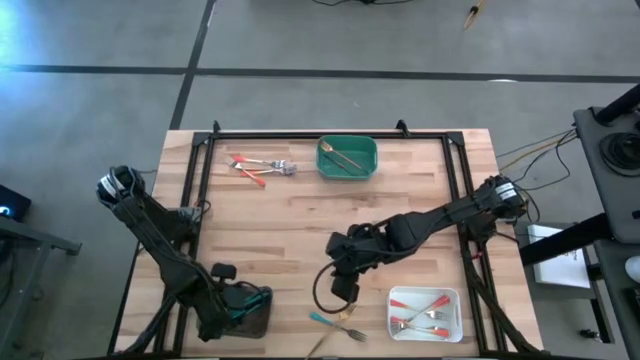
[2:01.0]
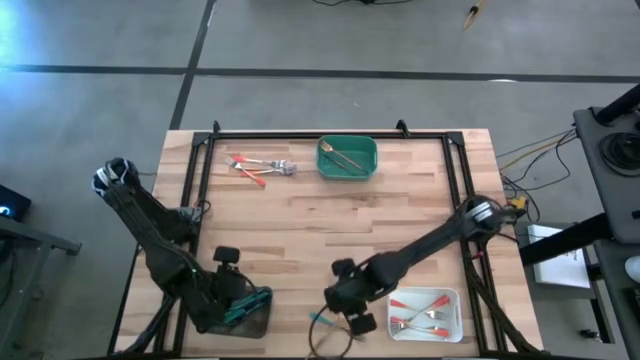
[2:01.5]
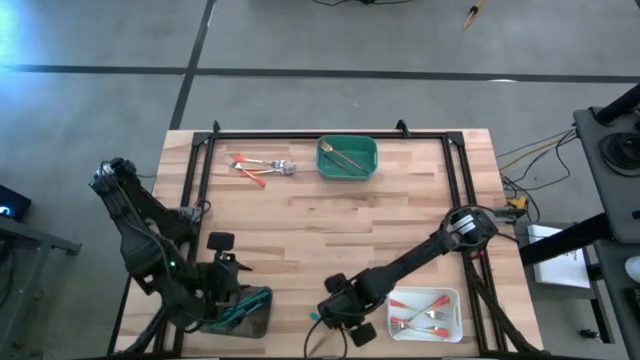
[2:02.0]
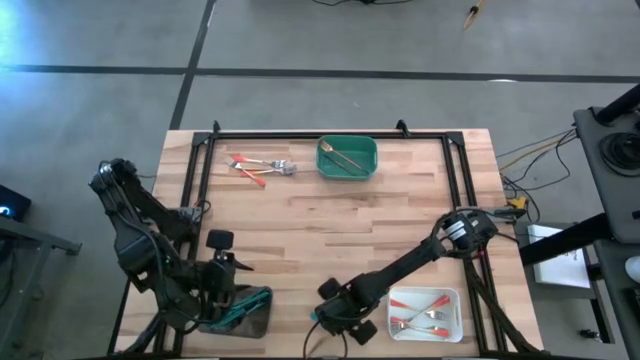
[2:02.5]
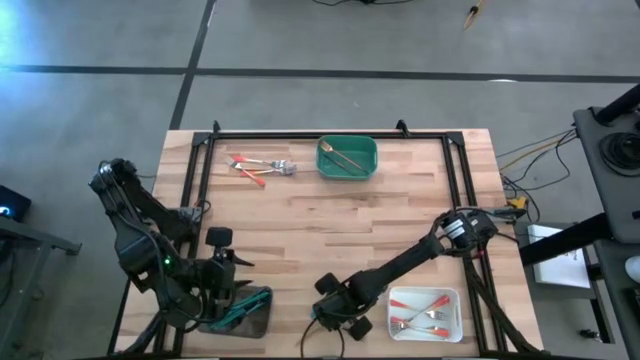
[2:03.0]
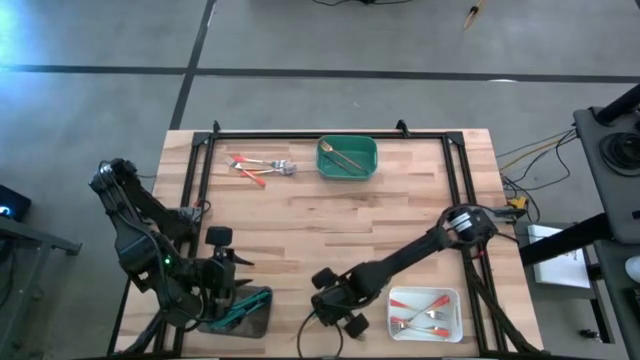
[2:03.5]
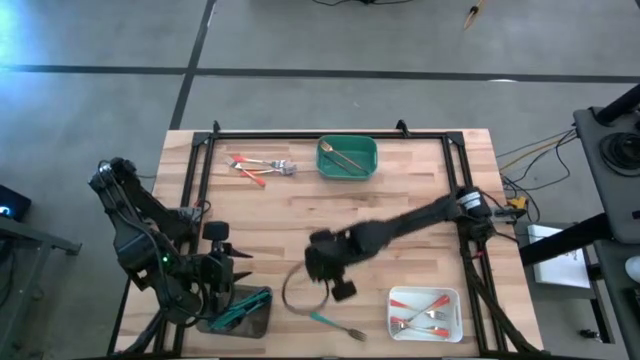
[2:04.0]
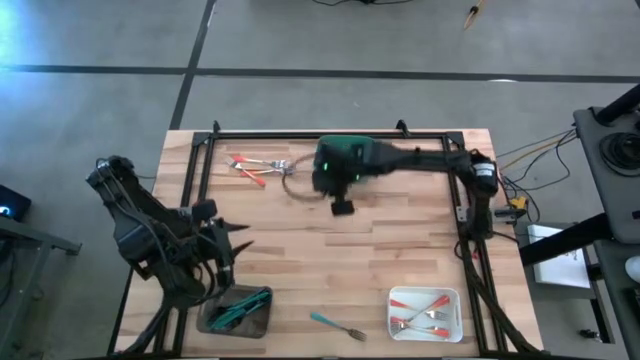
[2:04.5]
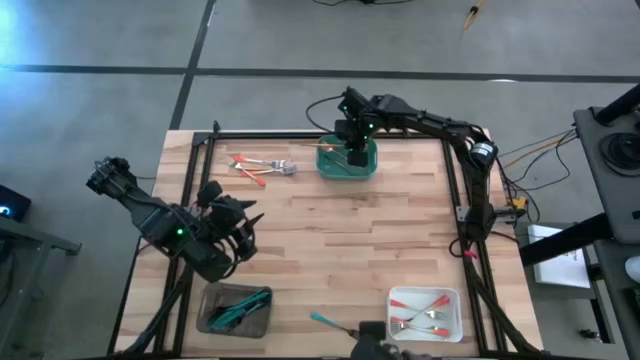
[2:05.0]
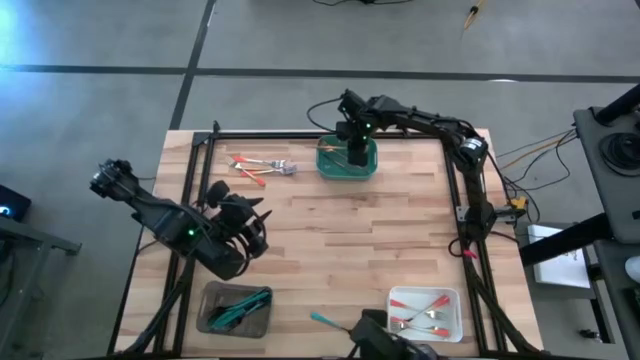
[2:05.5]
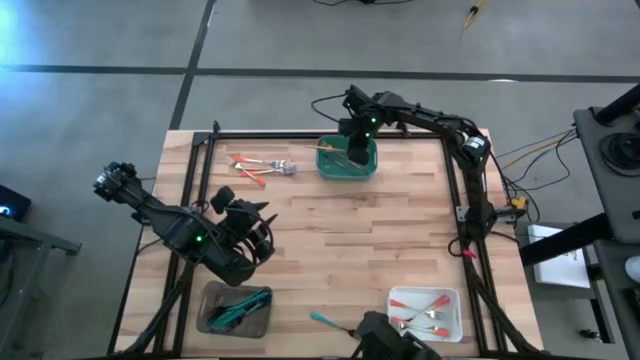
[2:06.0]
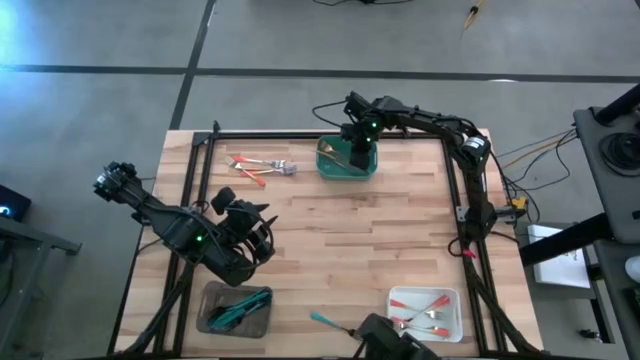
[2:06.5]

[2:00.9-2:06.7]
Task: Sort silverware by color (type)
Put the gold fork into the green bin

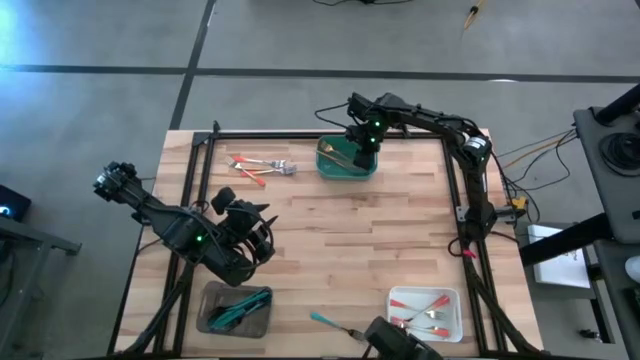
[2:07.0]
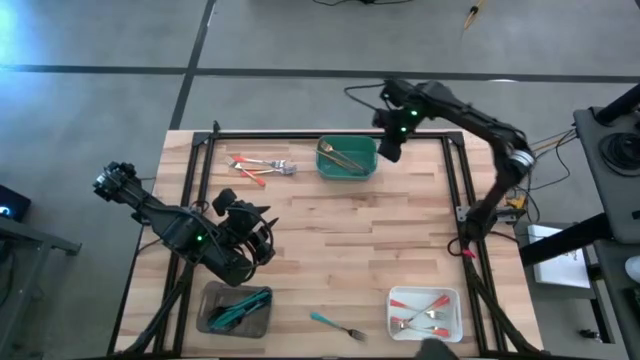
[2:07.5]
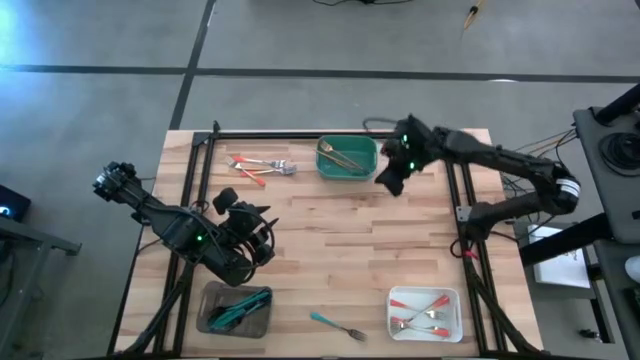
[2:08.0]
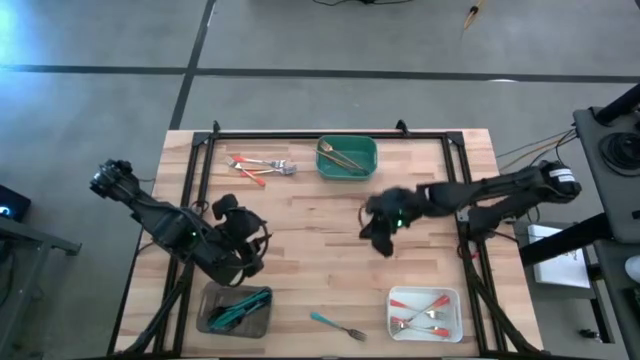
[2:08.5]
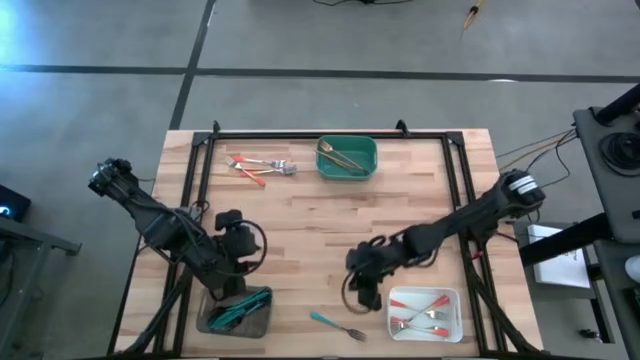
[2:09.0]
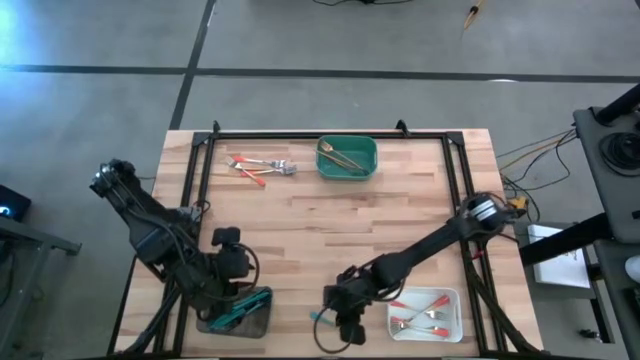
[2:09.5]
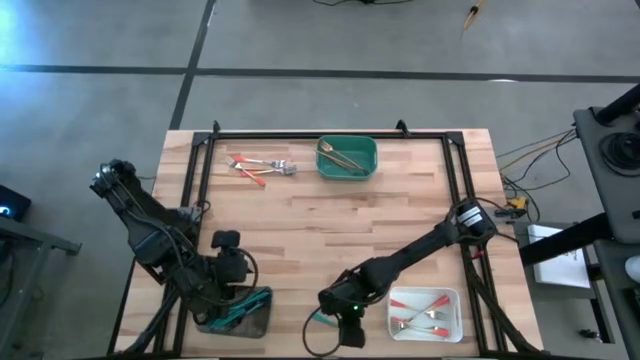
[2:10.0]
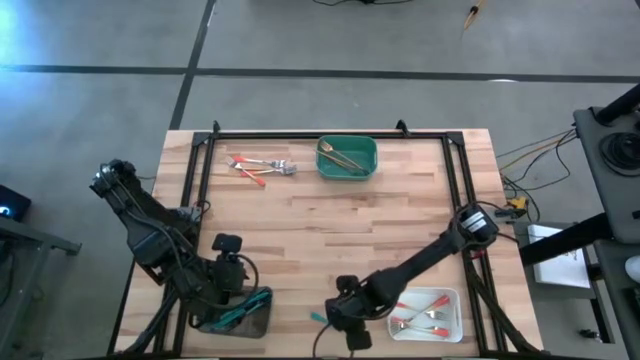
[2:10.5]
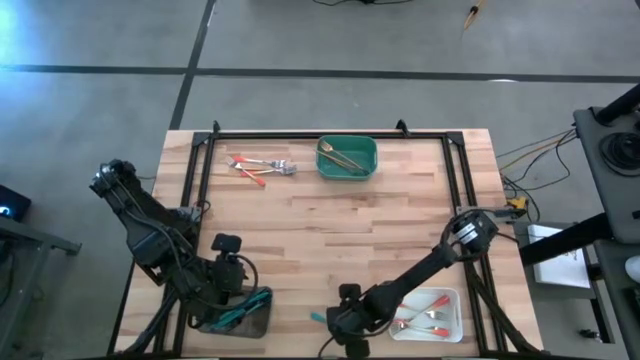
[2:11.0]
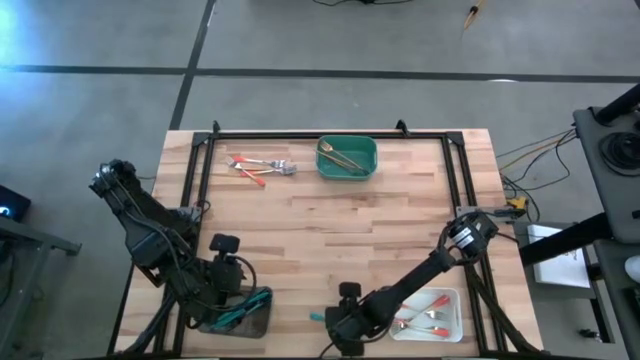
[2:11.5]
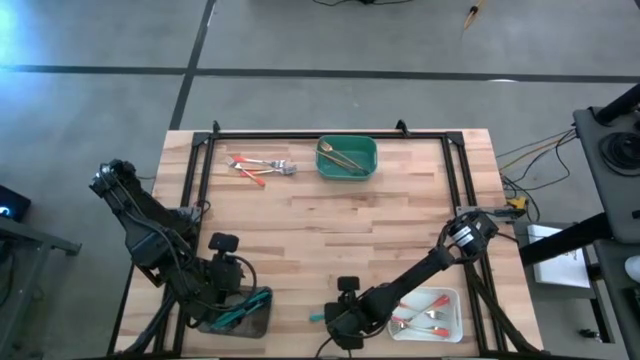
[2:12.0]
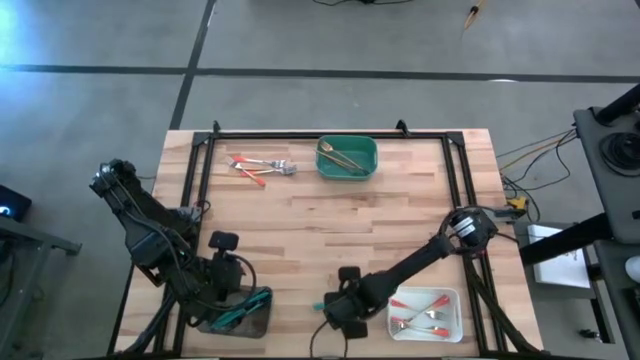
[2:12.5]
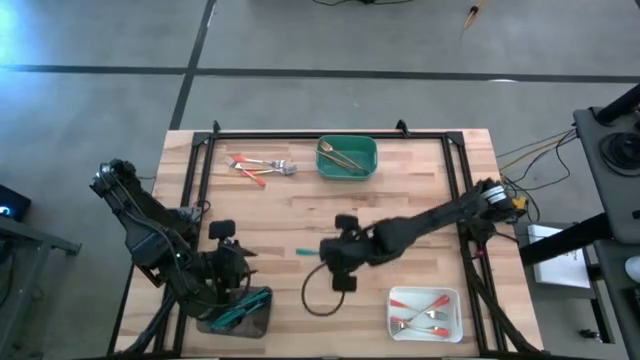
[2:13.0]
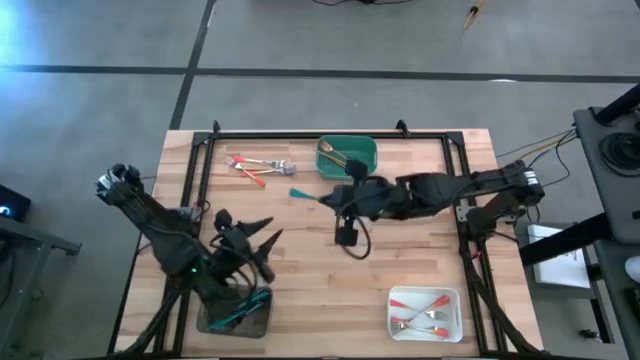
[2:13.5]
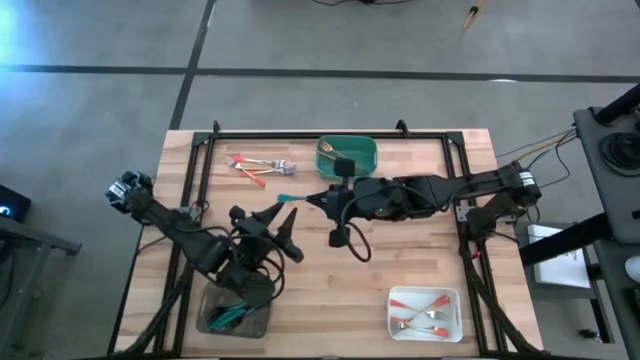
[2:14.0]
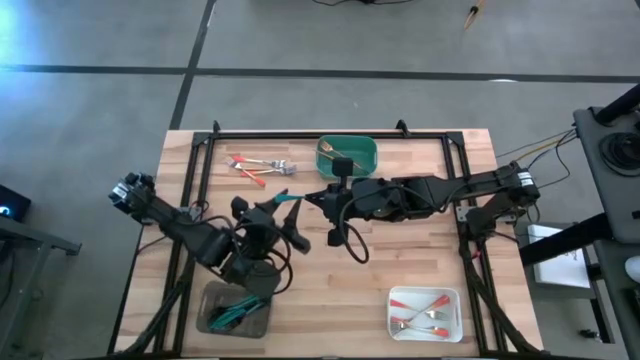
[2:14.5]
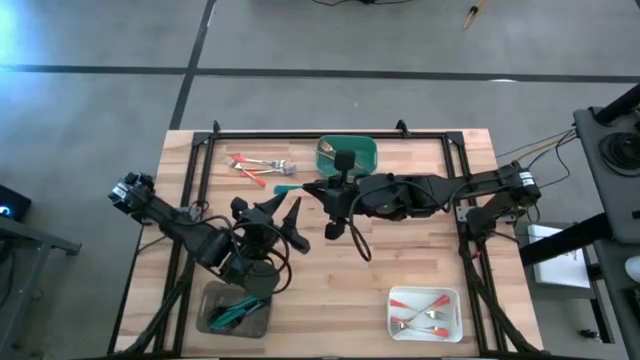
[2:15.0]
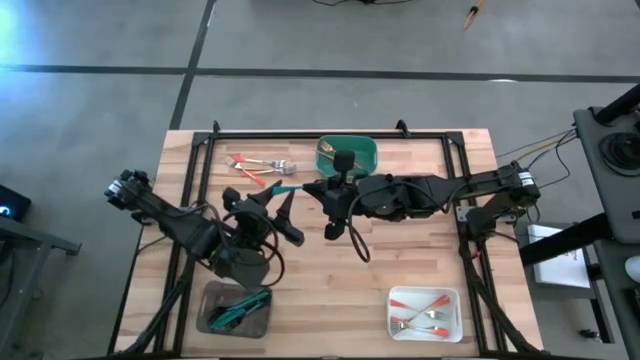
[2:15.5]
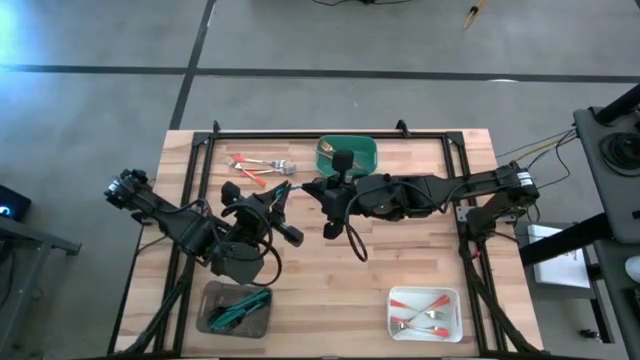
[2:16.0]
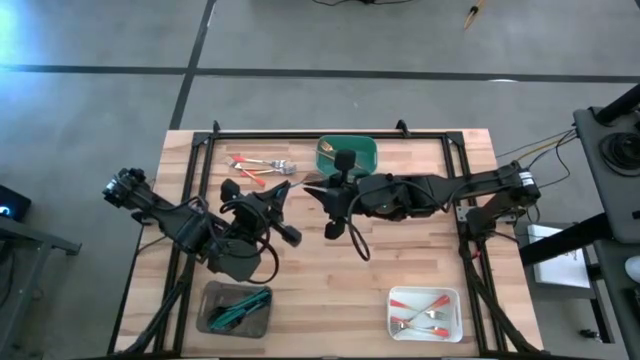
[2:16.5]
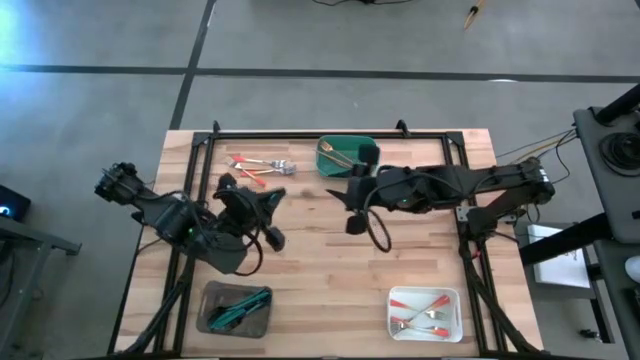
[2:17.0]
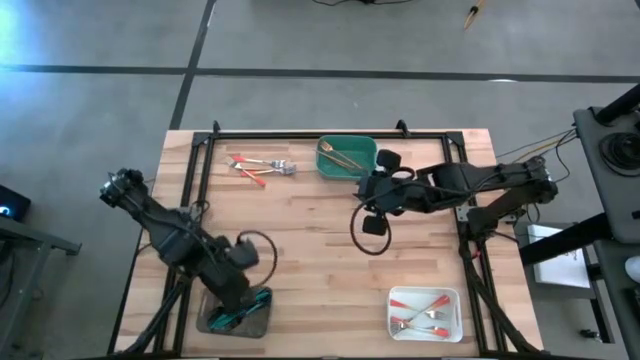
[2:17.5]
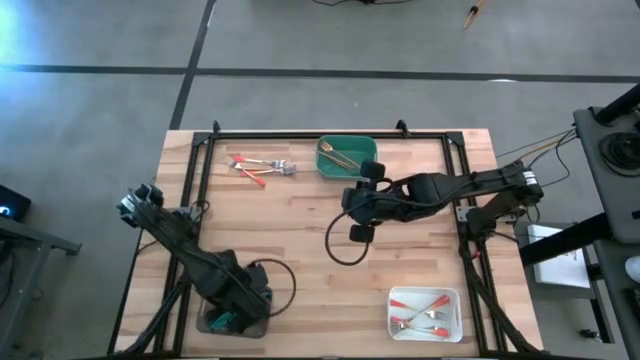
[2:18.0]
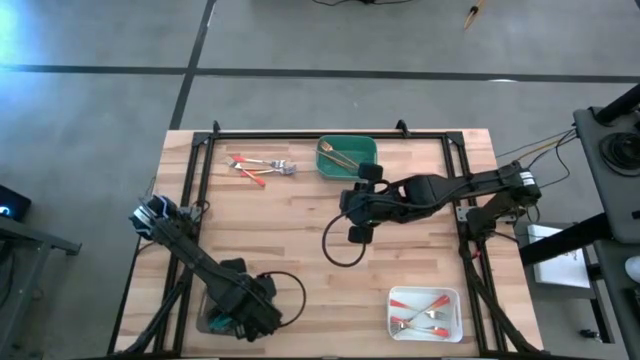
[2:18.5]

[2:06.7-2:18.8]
Put the blue fork into the black bin

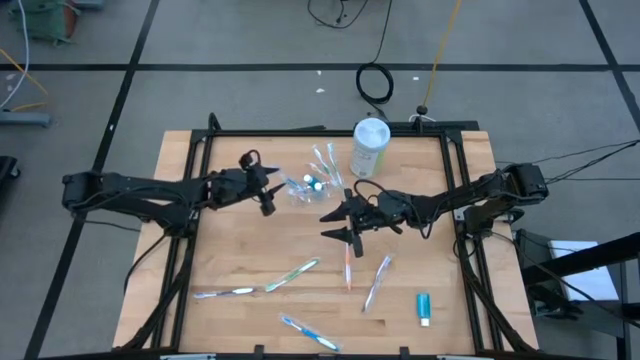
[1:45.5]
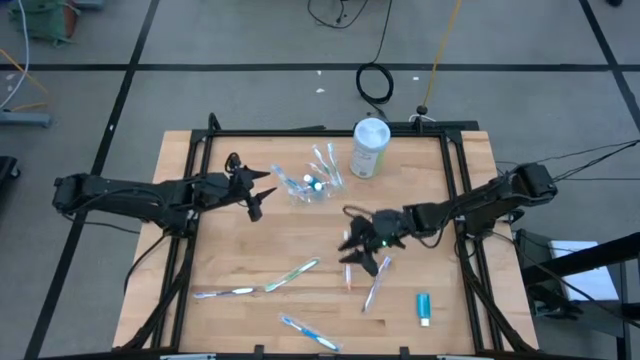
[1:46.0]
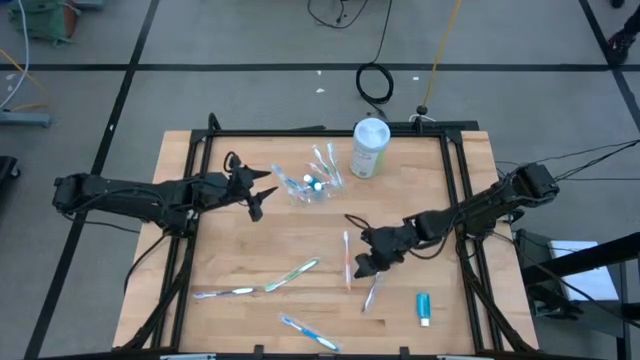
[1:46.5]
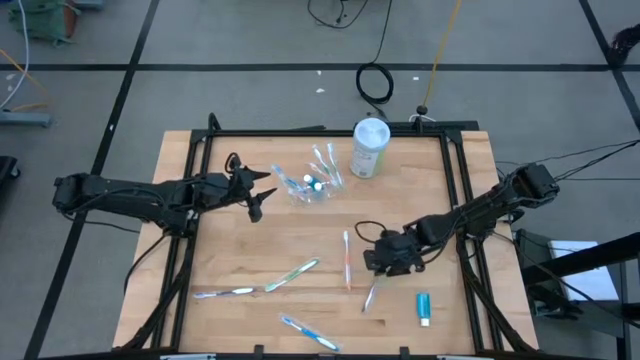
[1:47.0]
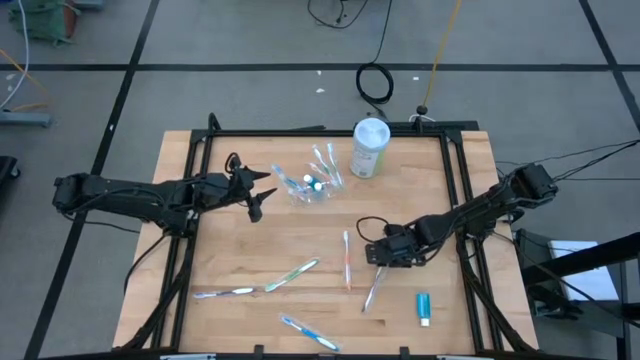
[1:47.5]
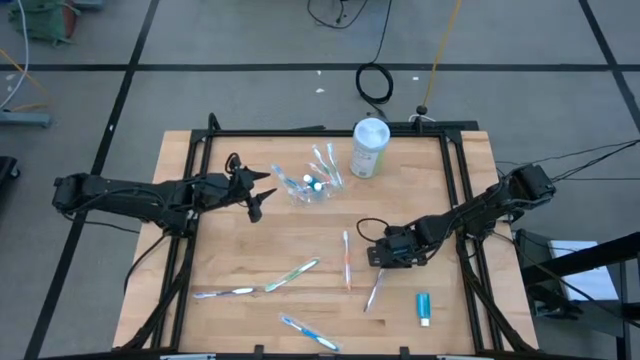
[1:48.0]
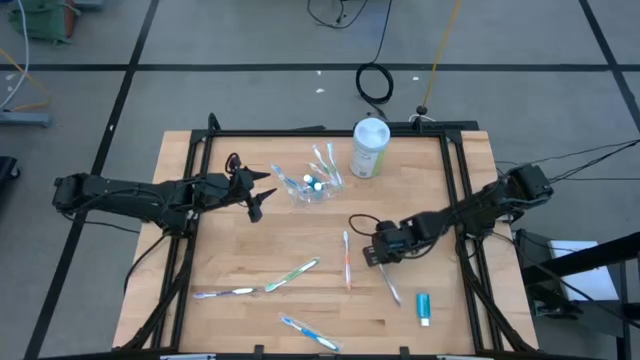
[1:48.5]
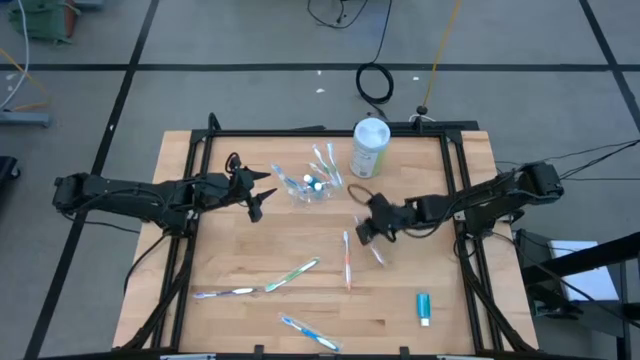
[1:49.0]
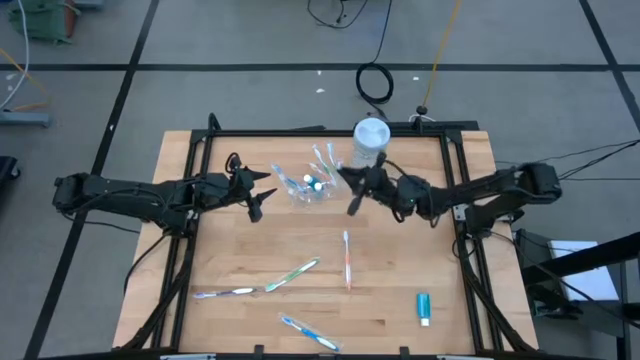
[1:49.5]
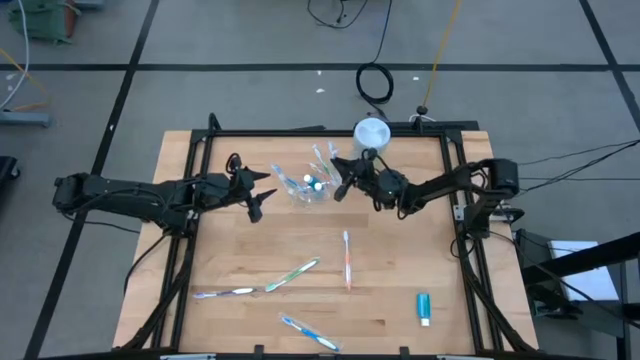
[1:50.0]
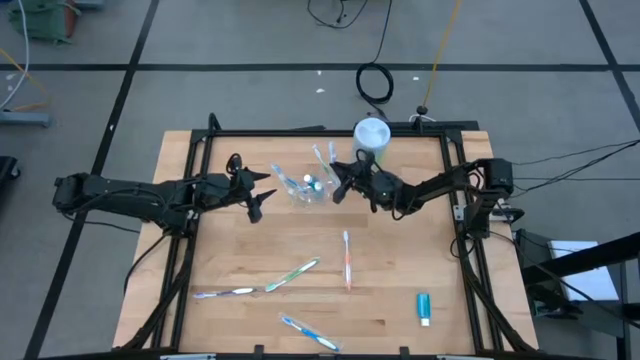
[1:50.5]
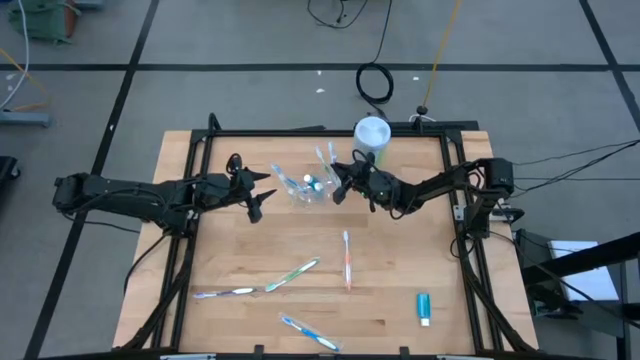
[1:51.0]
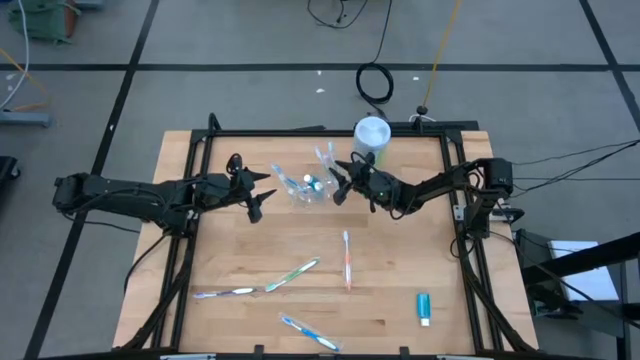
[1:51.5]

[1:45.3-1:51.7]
Task: Pick & Place toothbrushing station
Put the violet toothbrush into the transparent organizer
